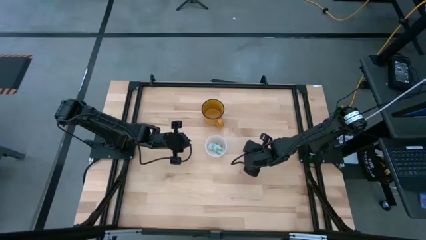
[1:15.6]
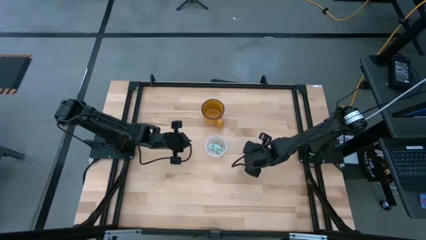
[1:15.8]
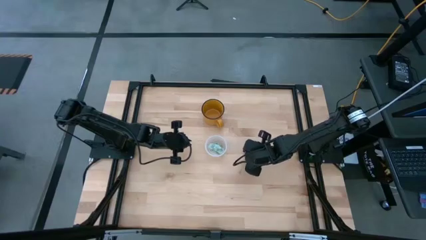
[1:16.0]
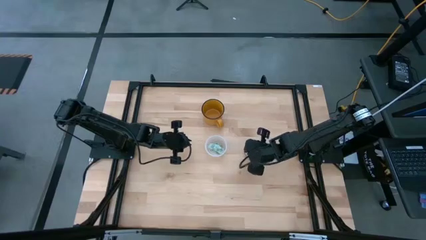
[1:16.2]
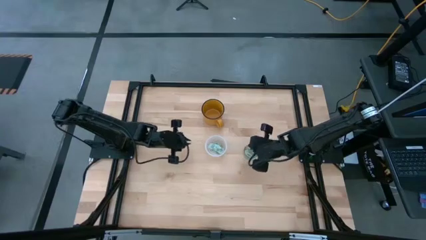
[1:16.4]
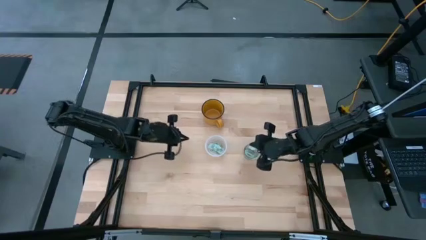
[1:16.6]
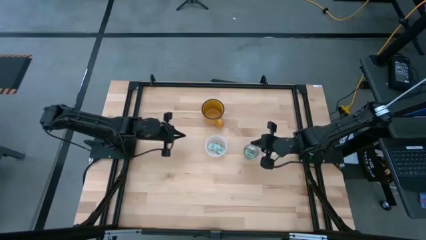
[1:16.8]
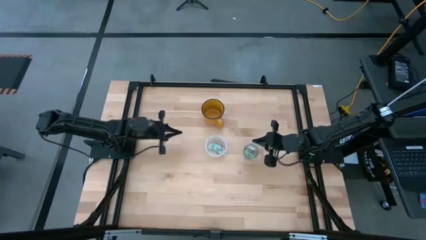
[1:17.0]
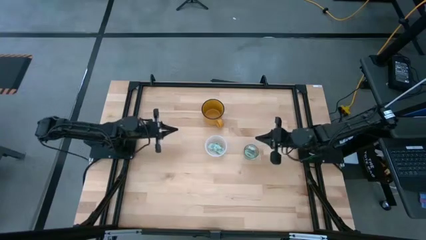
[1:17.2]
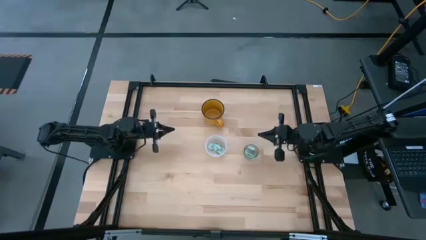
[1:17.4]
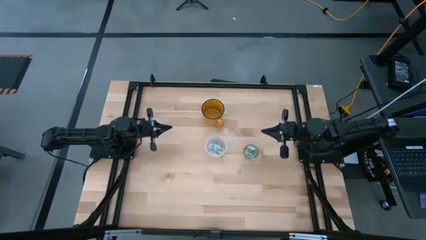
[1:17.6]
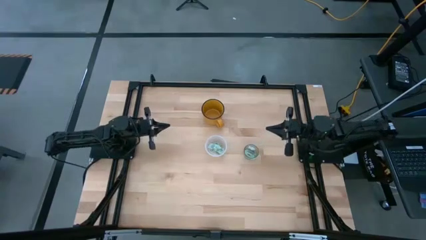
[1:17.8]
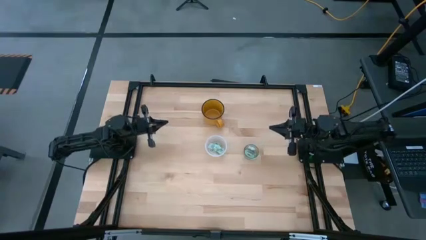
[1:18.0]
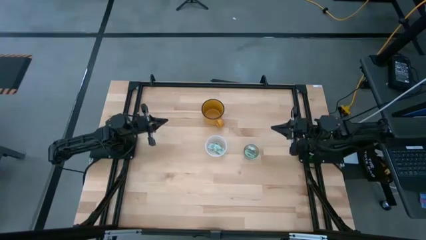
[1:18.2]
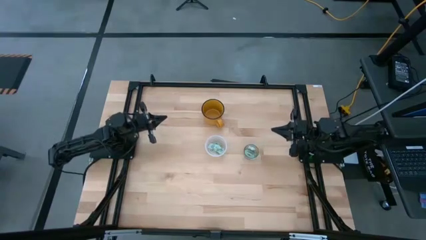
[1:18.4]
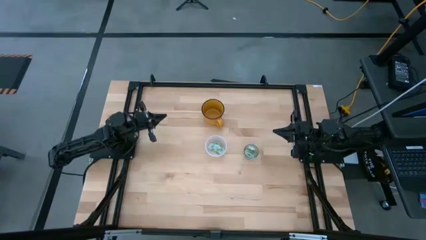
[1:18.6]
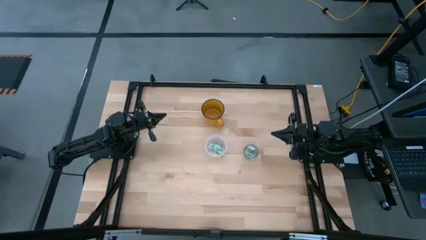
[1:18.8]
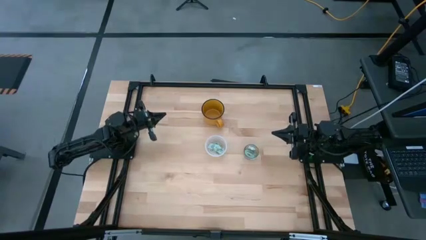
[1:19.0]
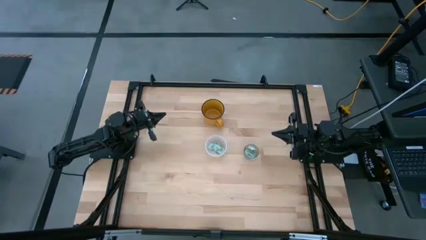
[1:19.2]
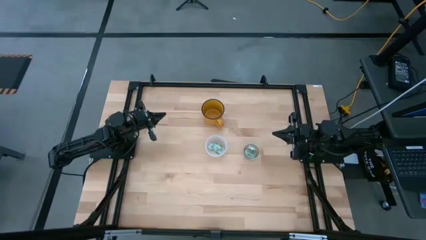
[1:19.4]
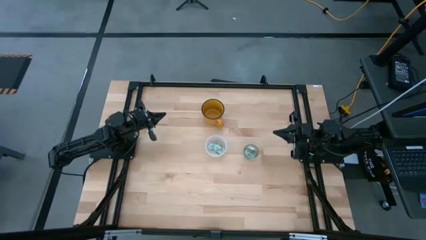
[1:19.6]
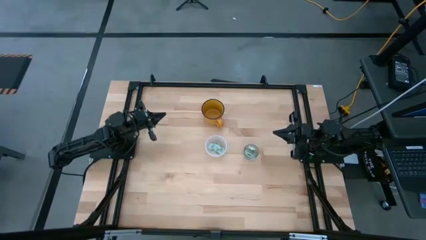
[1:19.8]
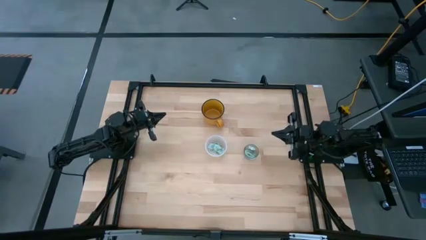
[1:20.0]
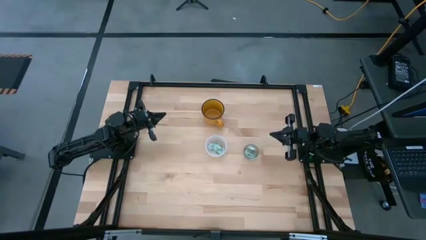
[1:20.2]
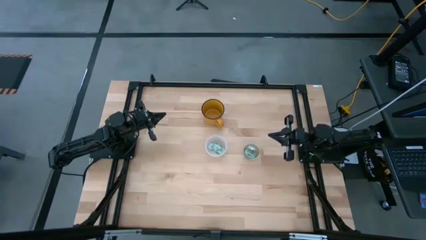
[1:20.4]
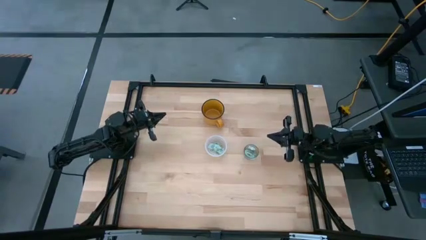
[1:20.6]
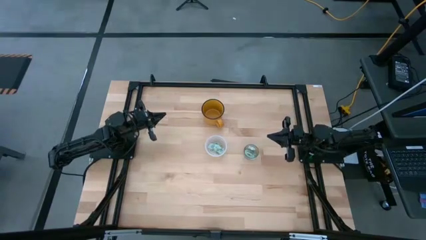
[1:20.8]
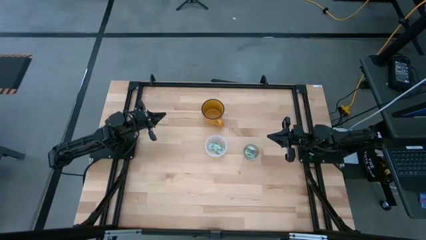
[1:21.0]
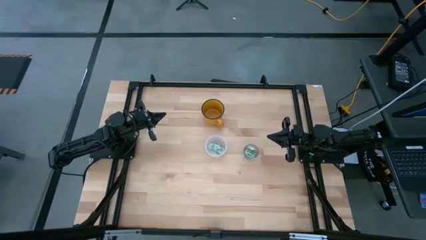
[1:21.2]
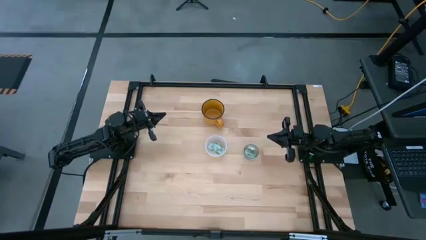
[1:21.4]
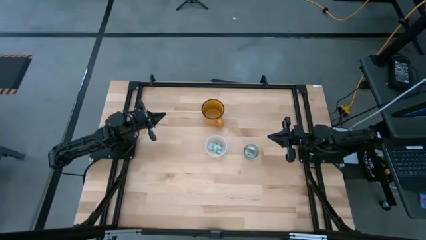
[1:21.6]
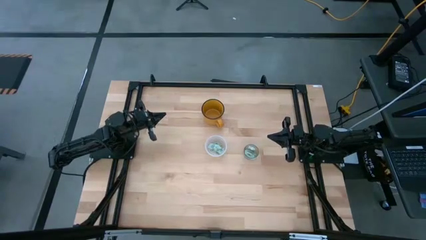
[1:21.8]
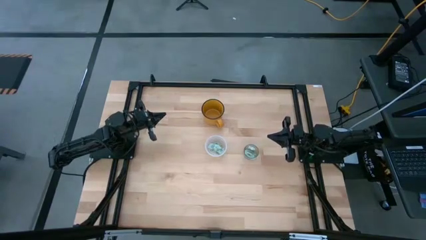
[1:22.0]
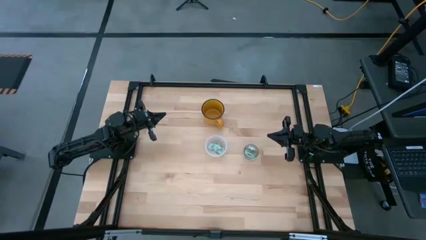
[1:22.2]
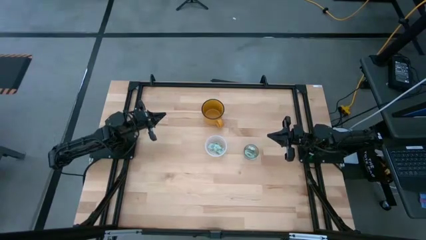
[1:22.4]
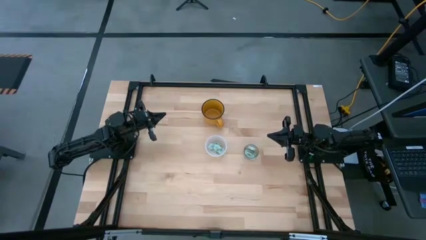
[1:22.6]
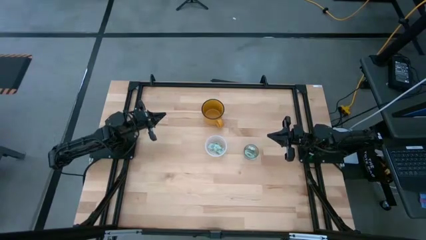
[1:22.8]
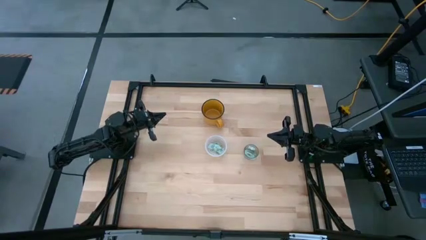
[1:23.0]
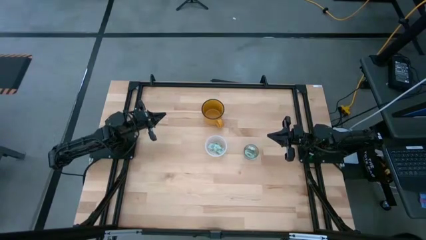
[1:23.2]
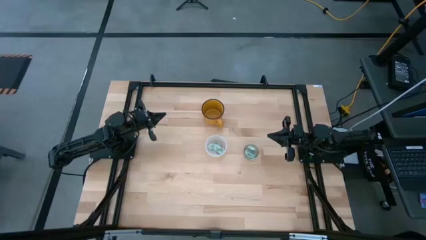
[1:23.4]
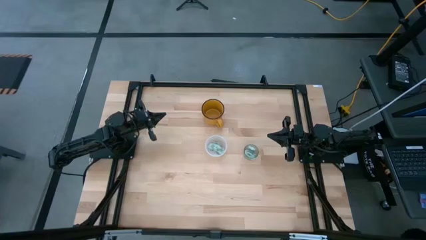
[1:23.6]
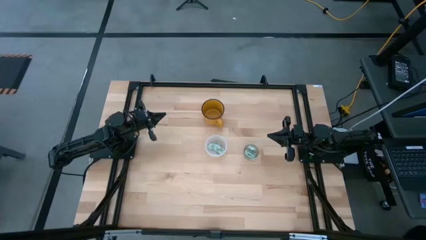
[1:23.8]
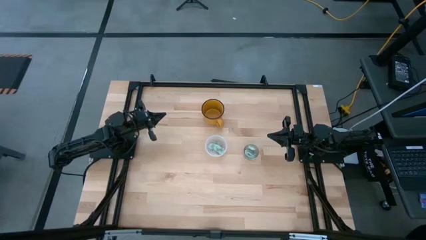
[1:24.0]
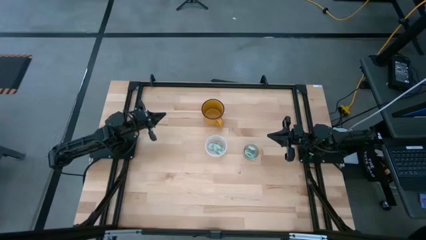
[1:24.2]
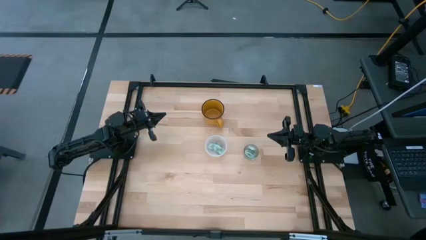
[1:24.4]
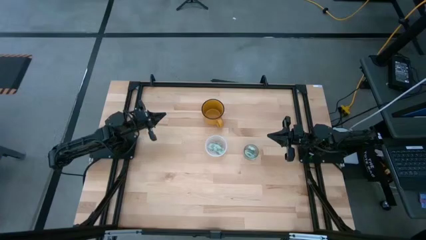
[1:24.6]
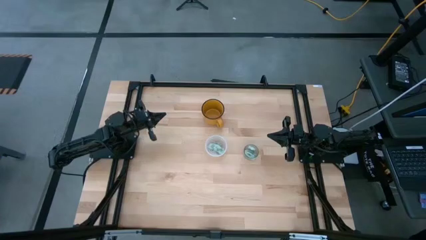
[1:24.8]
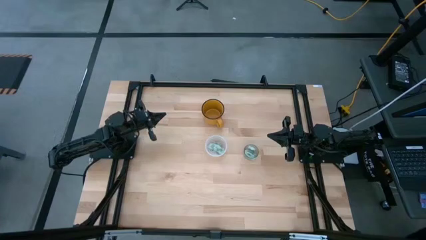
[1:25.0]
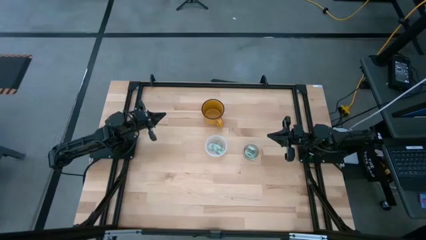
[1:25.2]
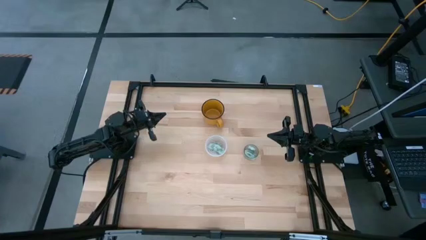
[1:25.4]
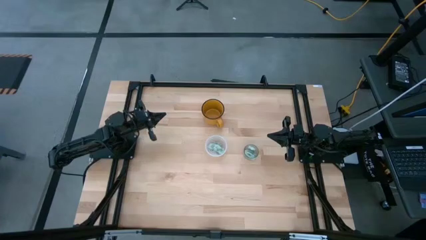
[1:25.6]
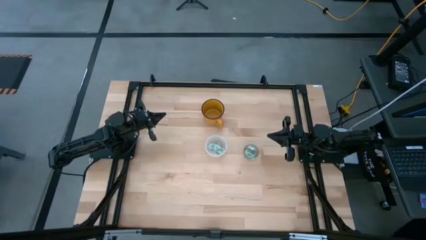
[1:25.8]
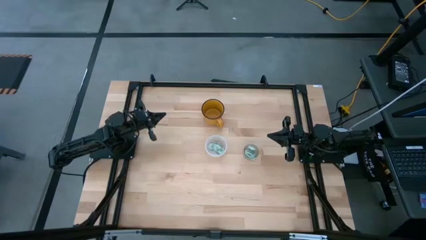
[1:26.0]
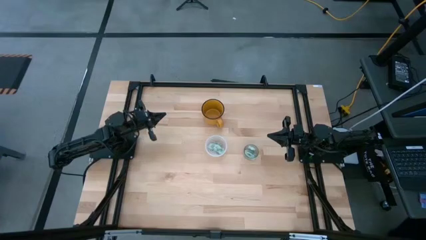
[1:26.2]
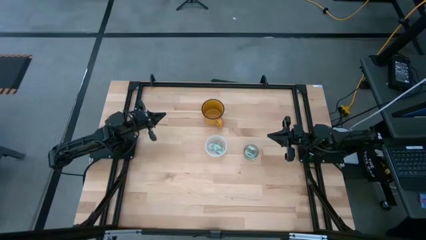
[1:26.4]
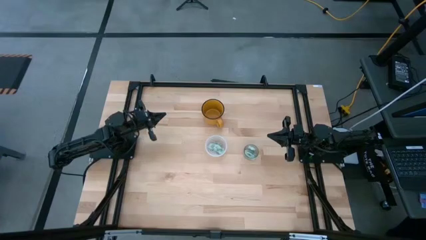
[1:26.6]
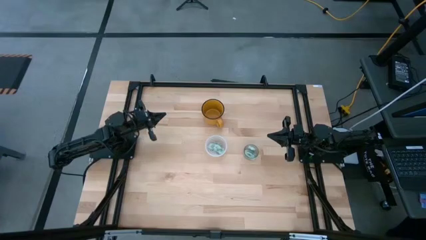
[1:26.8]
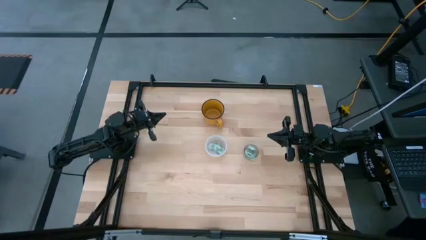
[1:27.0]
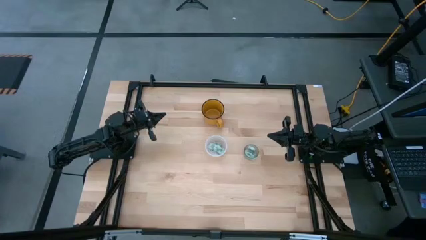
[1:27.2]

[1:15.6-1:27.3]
Task: Pick and place Stevia / Truvia into bins
Return to Home Position

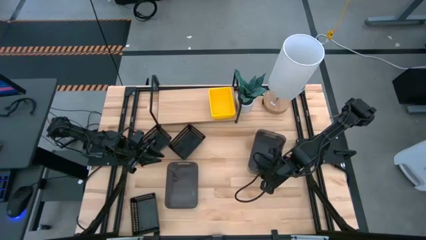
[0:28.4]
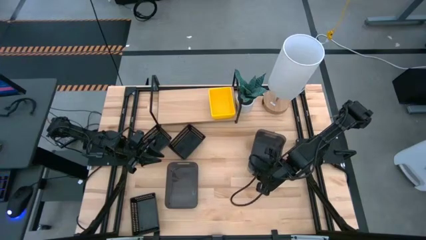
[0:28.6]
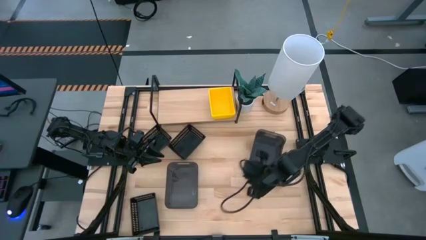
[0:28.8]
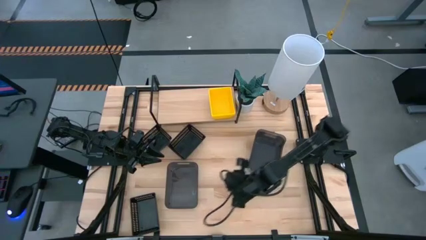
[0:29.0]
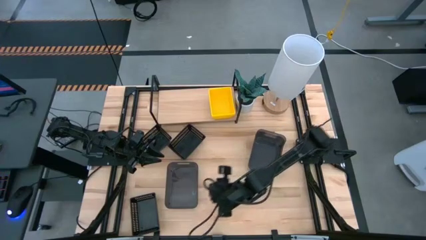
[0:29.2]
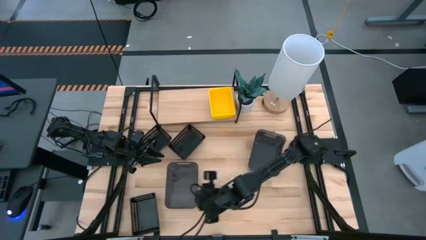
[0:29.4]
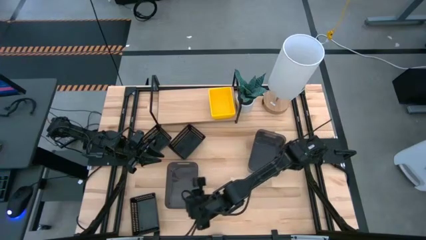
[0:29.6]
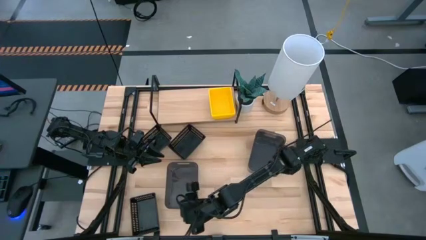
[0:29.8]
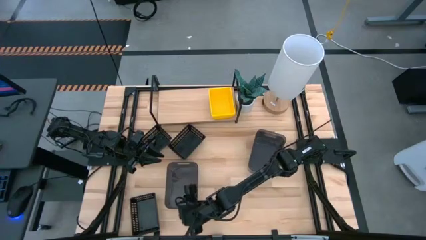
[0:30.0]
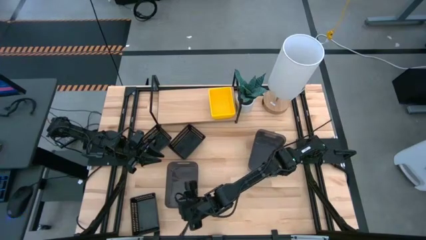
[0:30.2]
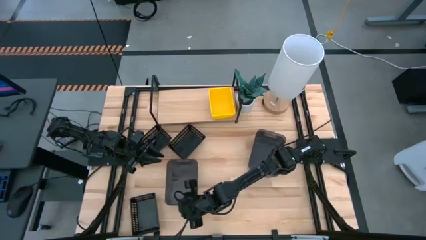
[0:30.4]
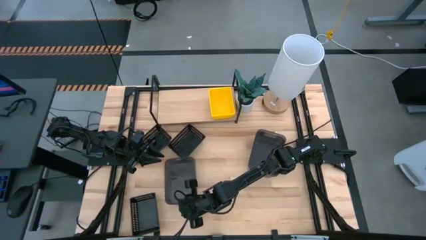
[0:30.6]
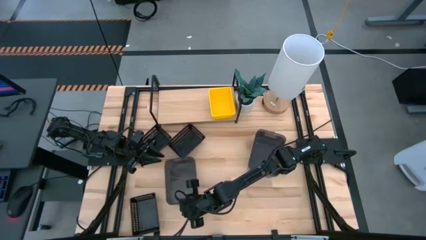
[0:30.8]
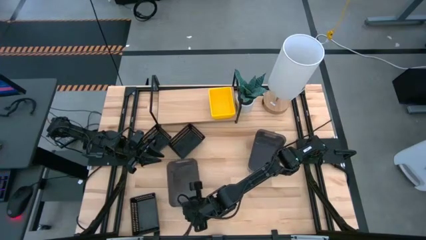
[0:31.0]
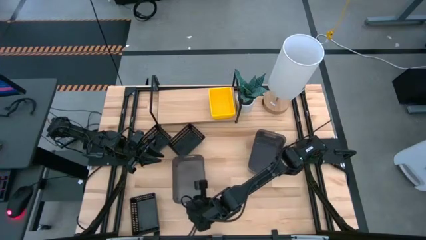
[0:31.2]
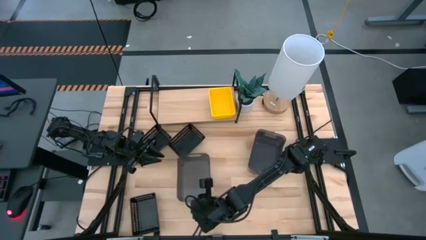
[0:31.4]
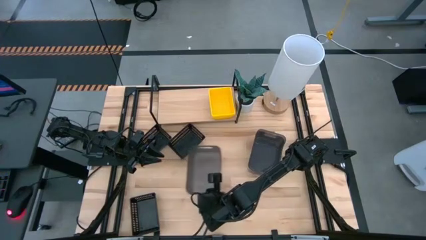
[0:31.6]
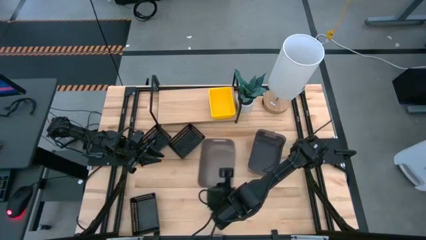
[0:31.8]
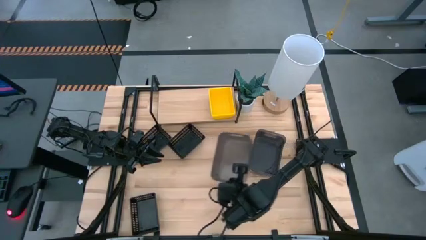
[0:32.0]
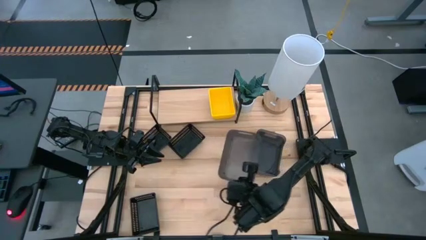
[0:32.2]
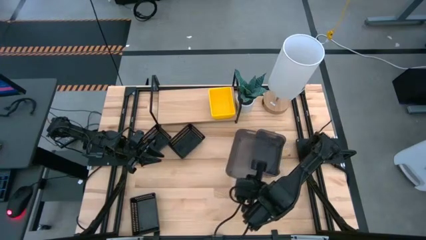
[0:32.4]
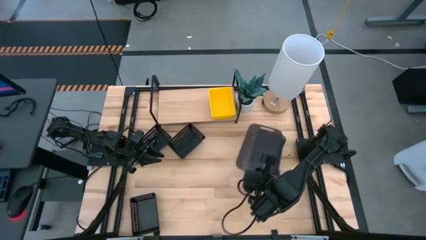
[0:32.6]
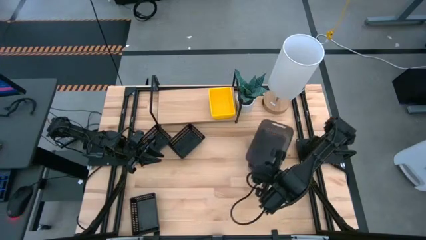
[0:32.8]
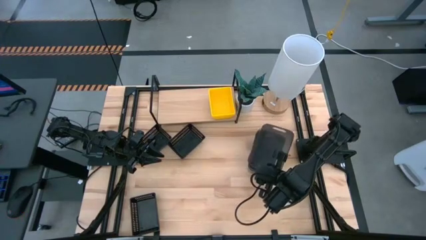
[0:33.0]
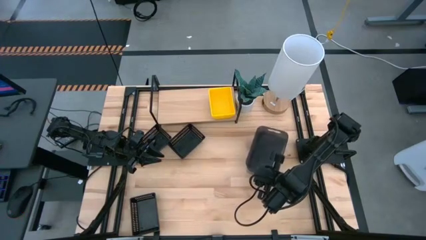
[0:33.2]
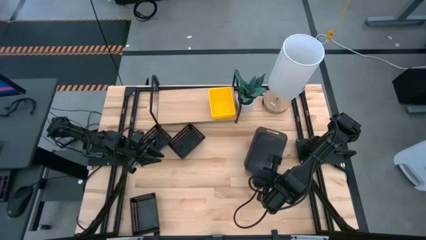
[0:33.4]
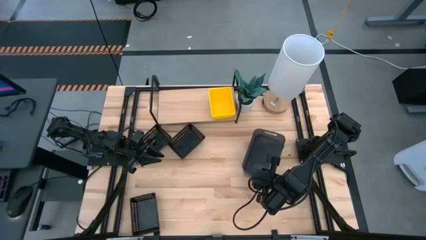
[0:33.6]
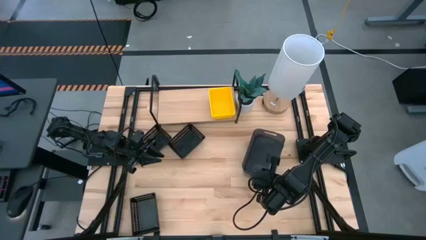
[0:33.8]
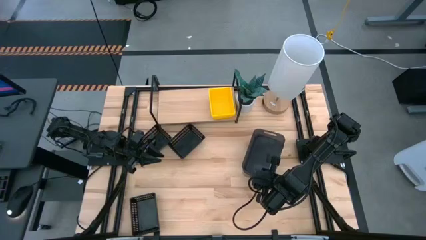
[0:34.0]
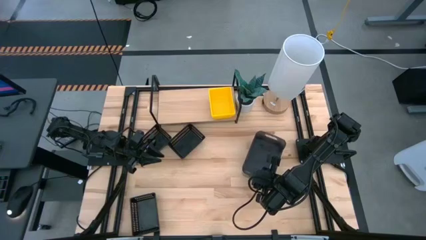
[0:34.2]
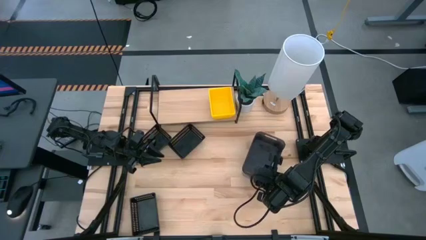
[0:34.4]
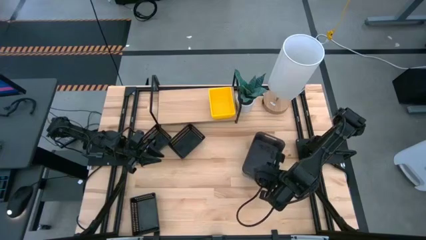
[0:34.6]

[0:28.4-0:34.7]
Task: Stack baskets on shelf by color
Stack the left transparent black bin on the right transparent black bin
